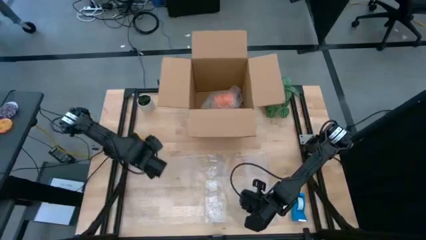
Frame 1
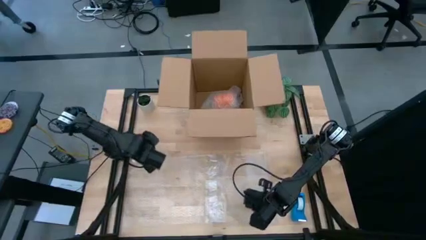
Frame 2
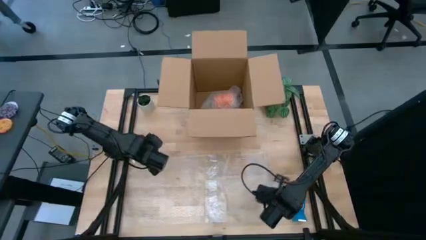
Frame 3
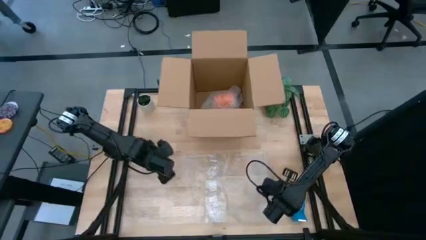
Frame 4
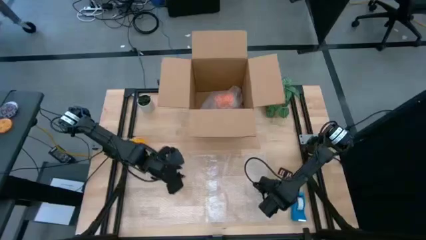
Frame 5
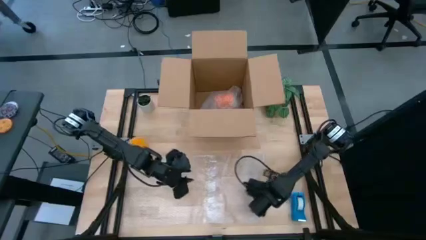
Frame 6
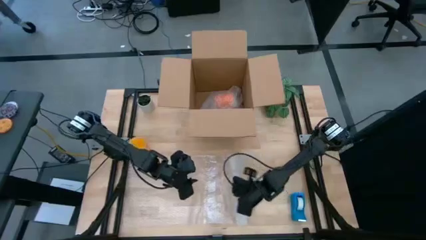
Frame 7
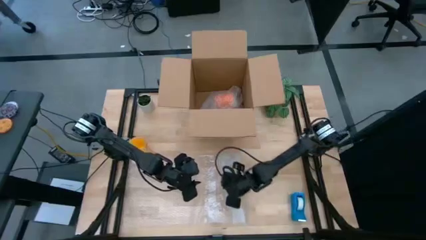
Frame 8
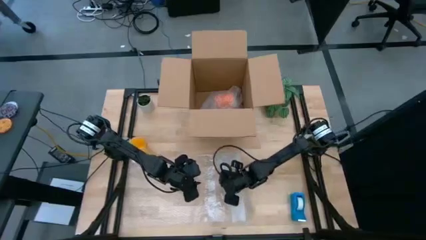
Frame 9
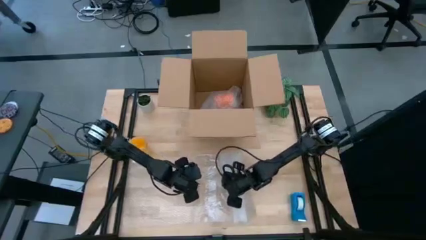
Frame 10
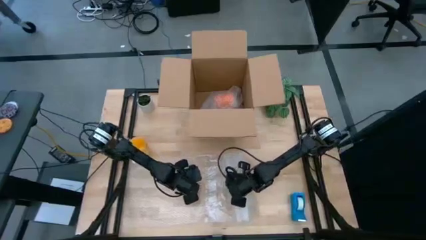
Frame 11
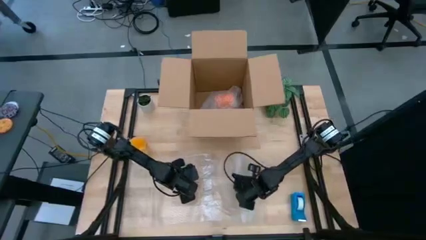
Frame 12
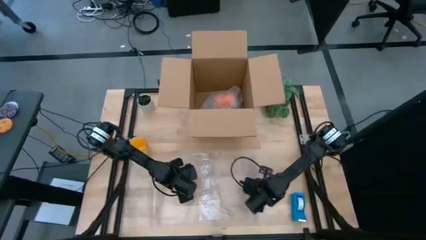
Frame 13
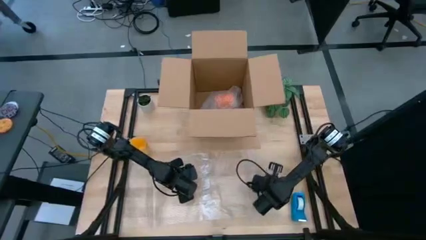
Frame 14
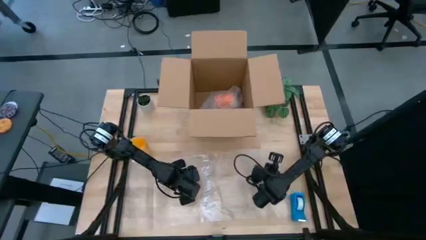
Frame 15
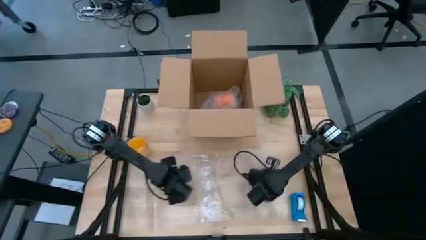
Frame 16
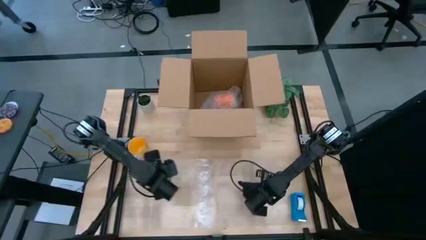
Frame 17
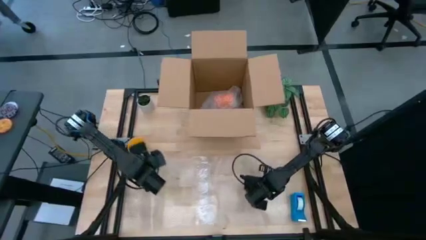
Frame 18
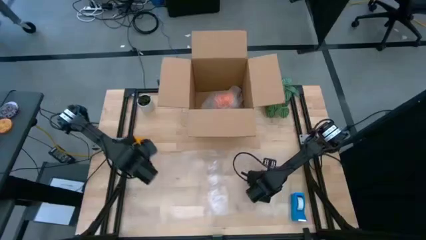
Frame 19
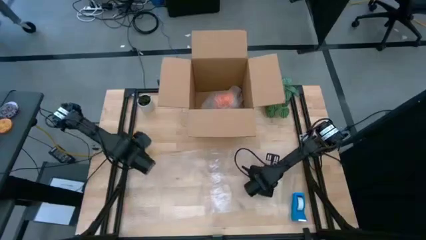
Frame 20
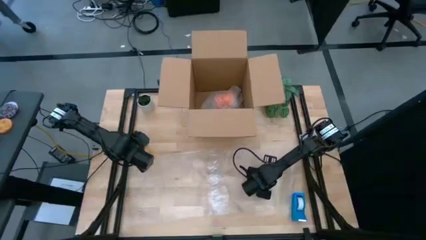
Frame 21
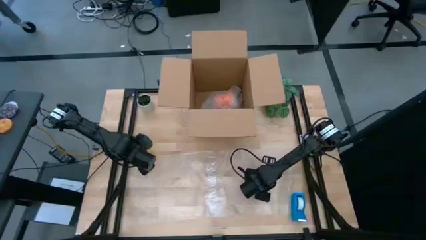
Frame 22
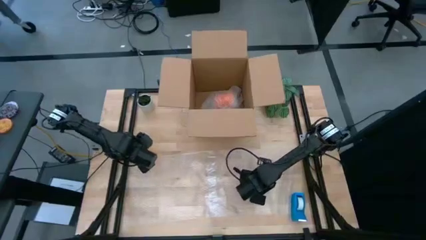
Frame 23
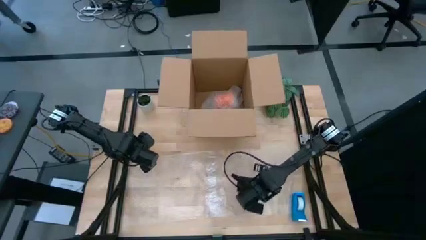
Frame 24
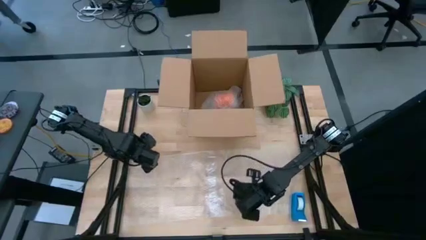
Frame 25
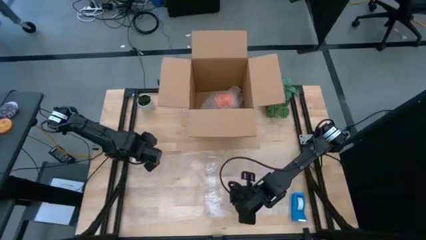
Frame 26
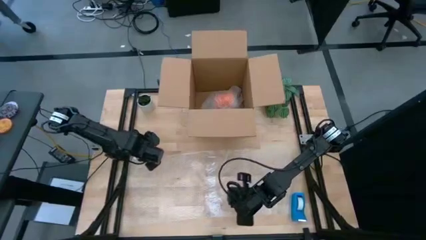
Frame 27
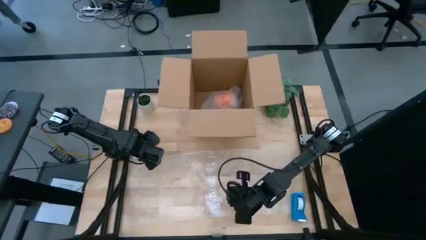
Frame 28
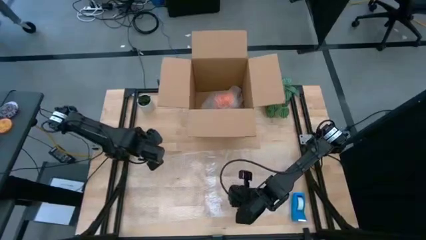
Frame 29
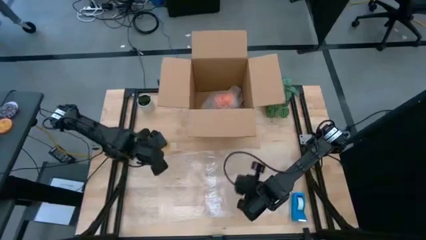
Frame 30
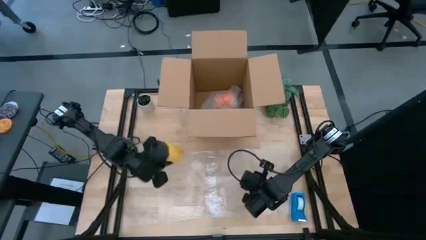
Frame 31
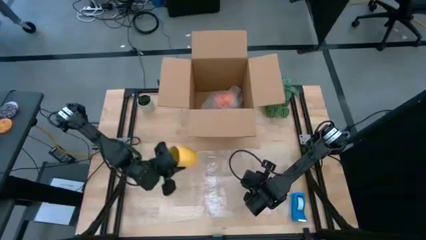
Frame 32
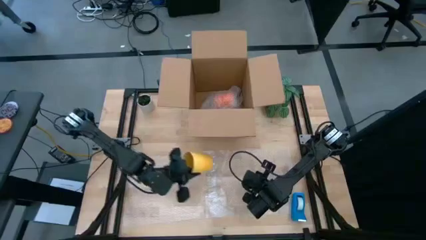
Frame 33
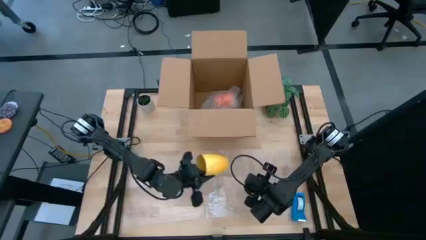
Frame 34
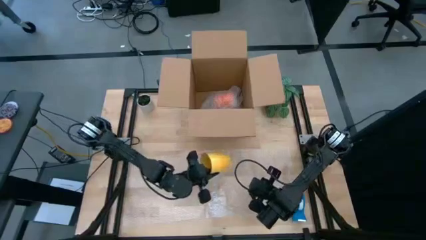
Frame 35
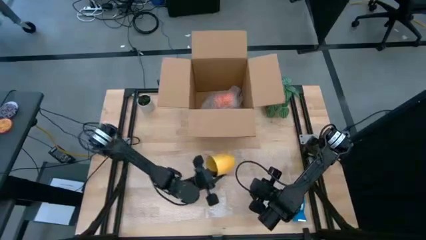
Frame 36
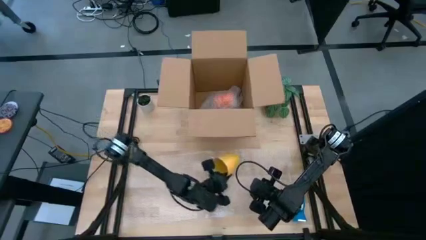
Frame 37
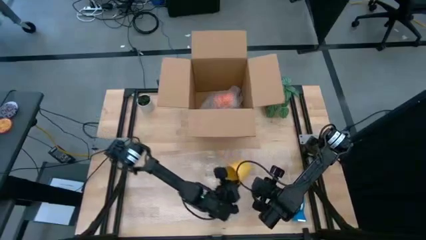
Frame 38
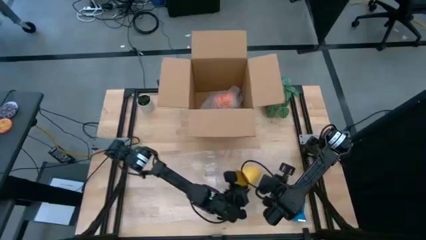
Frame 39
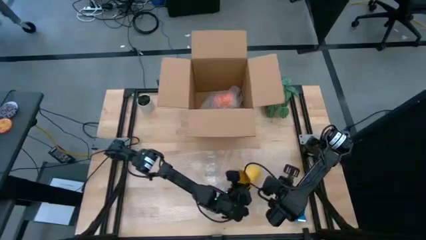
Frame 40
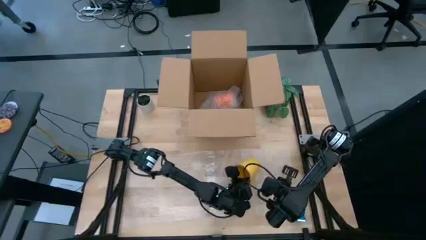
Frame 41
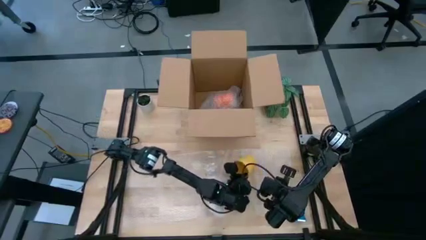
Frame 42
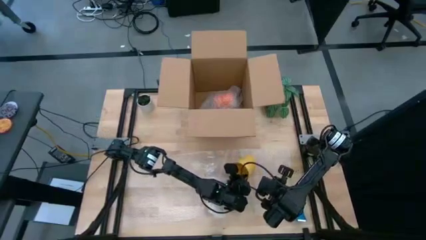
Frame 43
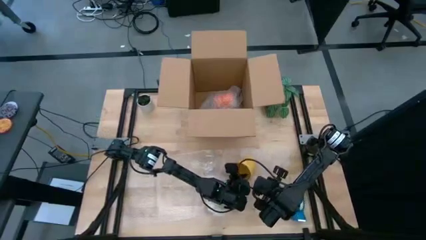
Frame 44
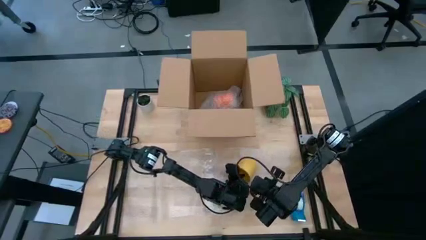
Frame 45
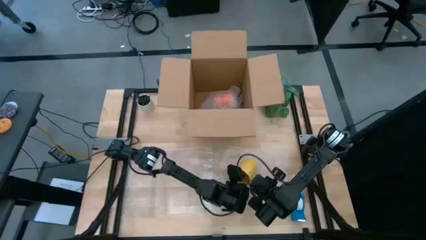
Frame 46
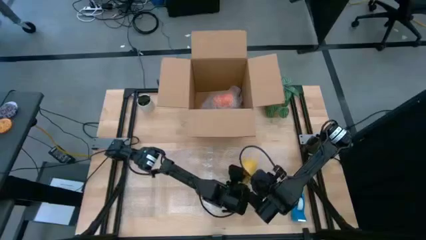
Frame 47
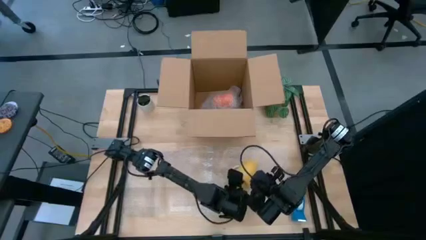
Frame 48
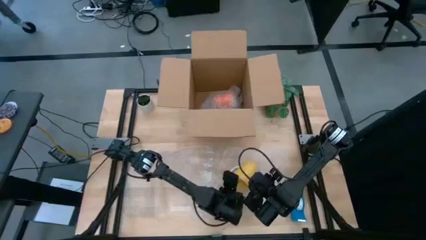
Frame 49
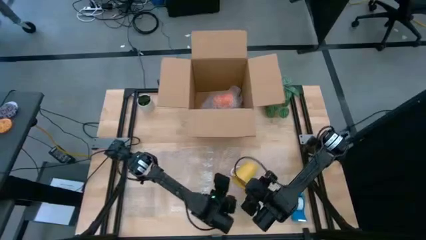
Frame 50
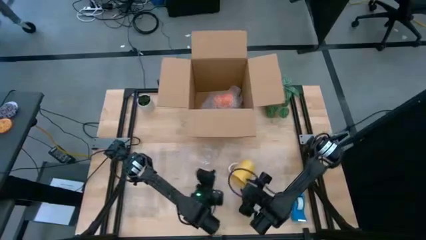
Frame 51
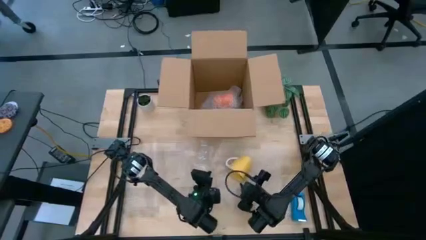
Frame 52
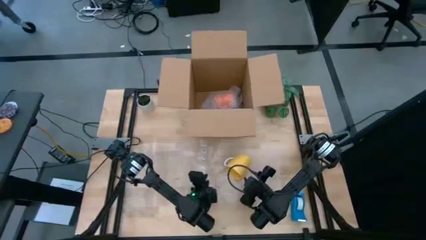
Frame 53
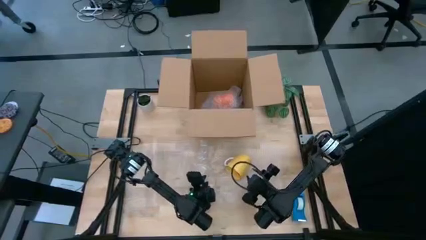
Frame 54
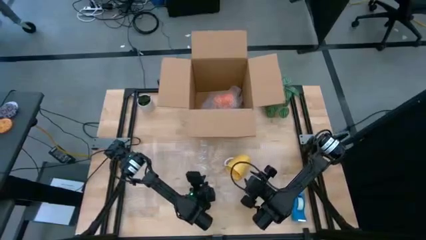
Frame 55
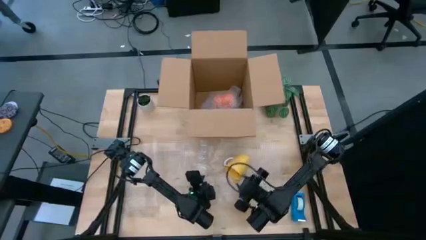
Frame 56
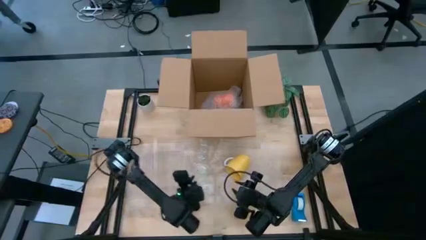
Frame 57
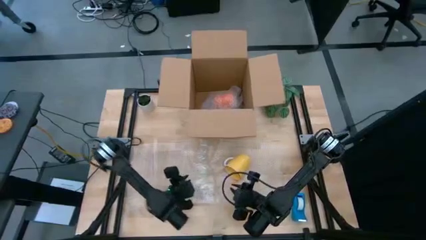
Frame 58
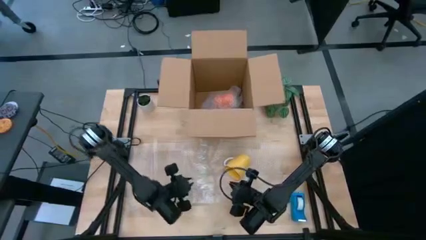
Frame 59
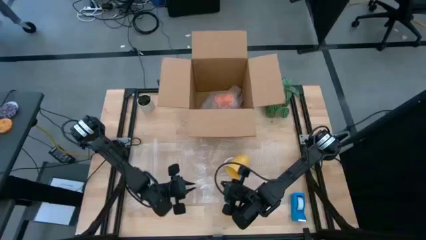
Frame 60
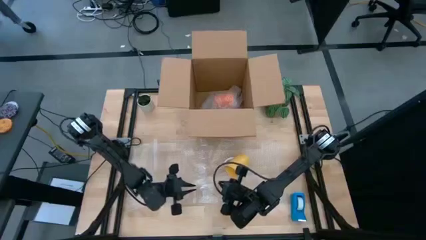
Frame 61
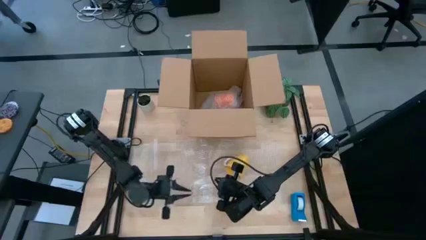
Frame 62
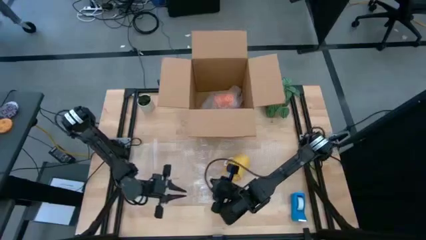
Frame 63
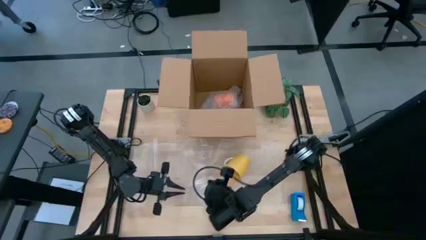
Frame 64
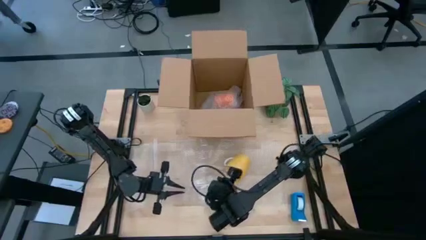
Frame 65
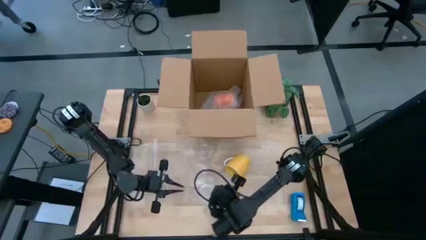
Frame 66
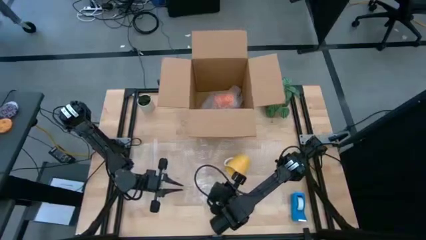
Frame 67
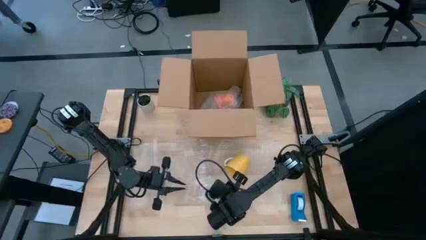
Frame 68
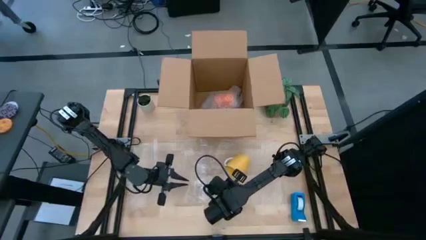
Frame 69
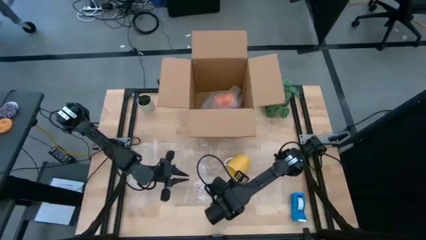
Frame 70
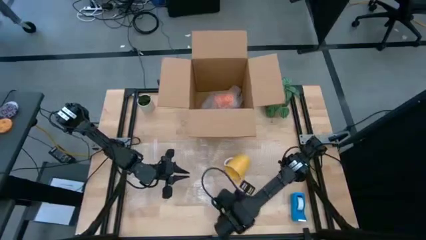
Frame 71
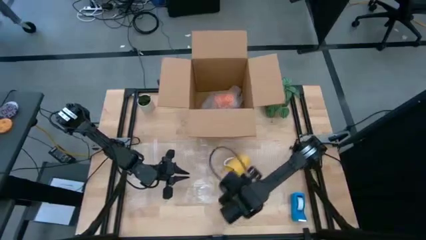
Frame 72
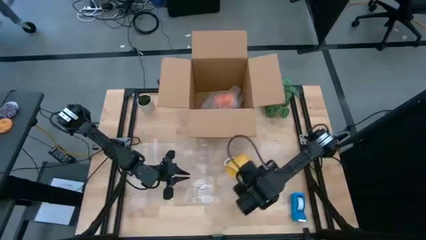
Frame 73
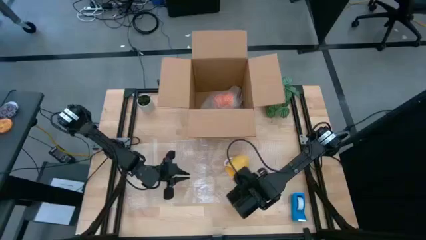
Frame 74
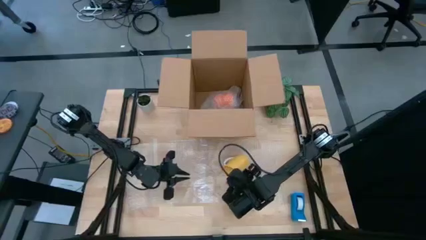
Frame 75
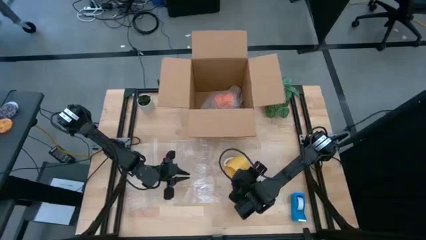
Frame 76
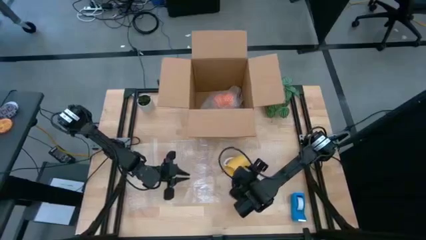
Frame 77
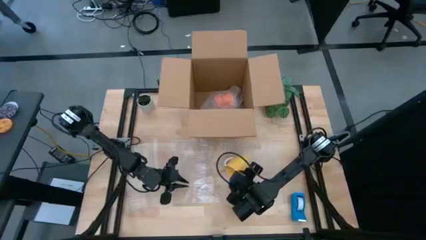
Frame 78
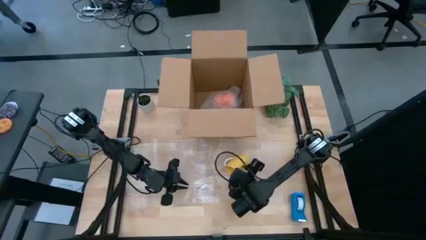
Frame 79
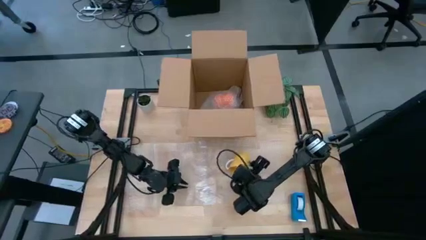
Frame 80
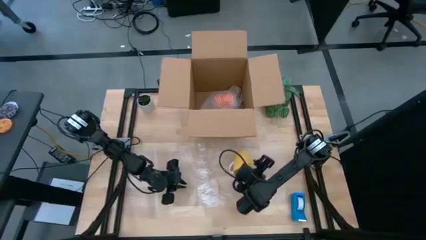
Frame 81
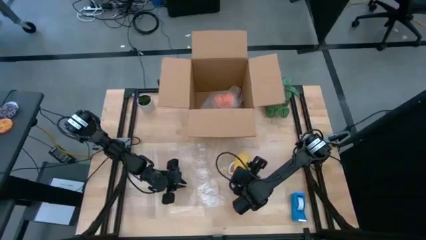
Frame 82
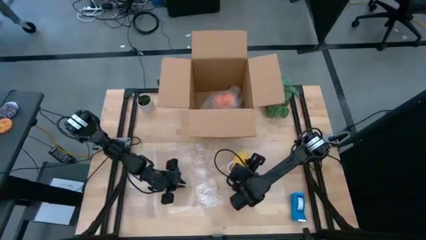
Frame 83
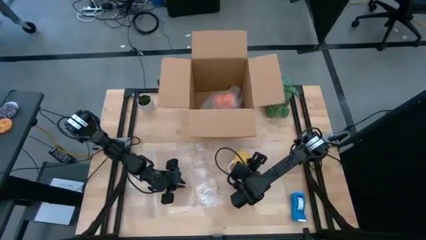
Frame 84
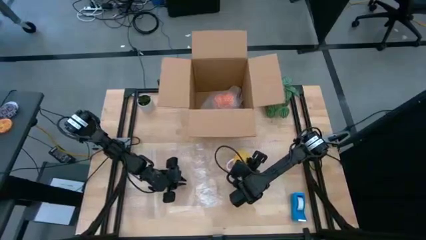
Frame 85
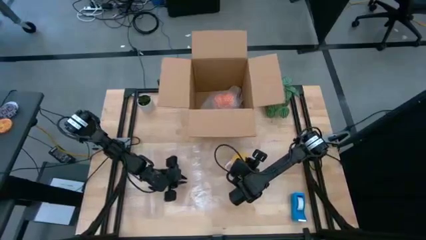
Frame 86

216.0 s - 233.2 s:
Task: wrap mug
Wrap the yellow mug with the bubble wrap
